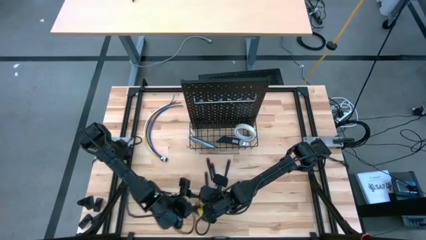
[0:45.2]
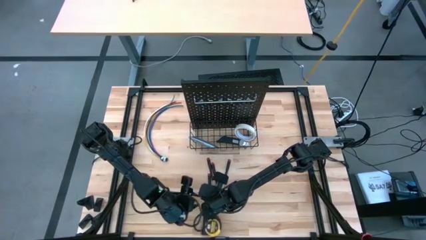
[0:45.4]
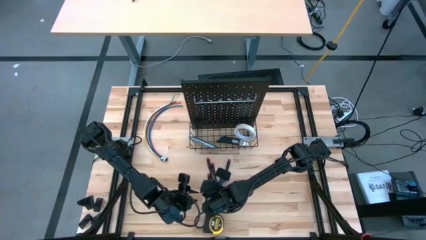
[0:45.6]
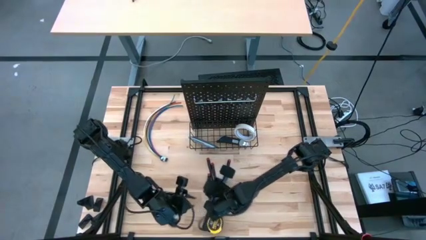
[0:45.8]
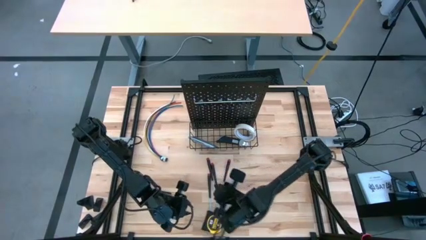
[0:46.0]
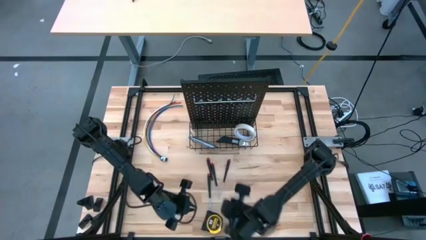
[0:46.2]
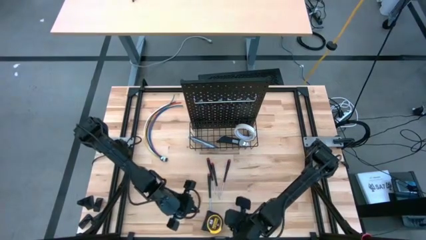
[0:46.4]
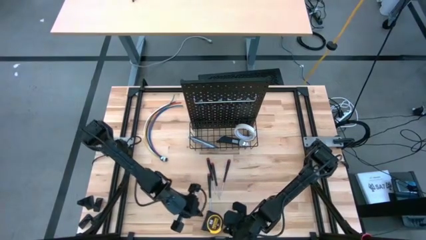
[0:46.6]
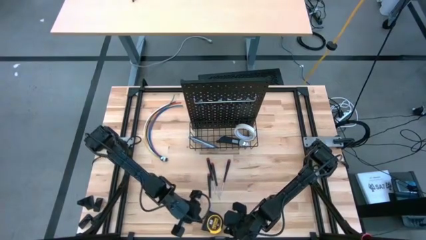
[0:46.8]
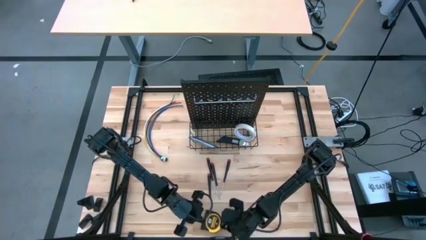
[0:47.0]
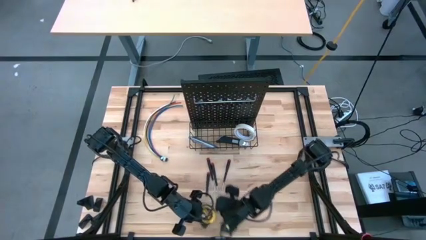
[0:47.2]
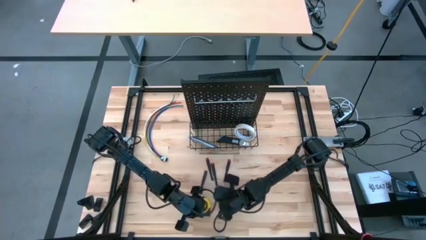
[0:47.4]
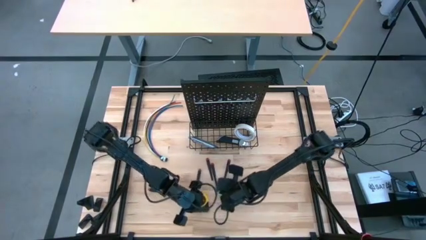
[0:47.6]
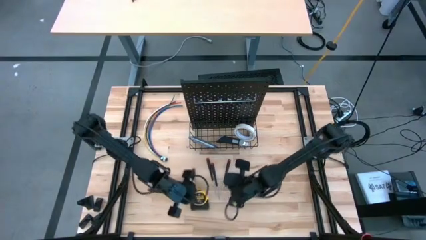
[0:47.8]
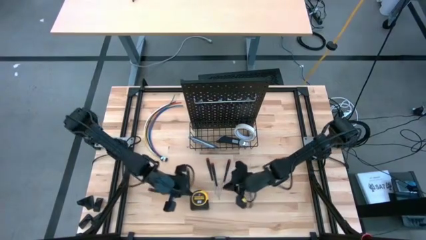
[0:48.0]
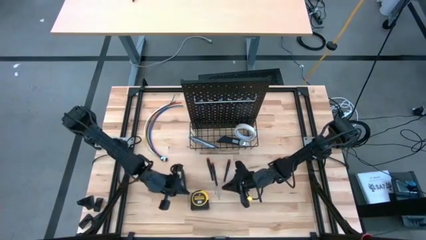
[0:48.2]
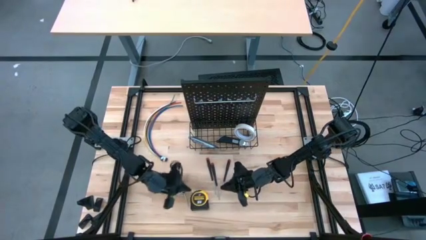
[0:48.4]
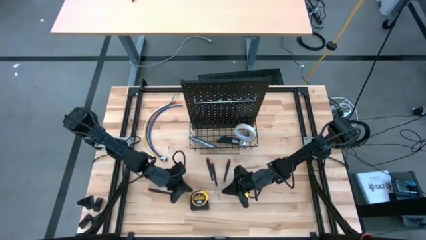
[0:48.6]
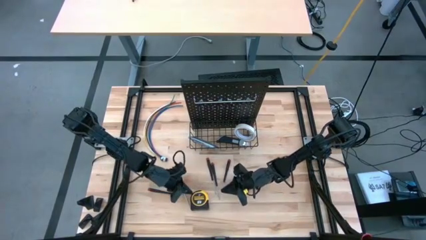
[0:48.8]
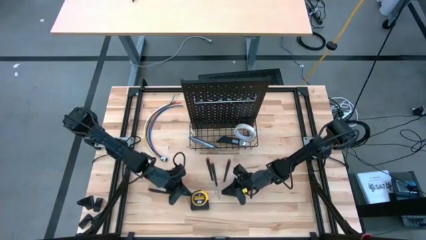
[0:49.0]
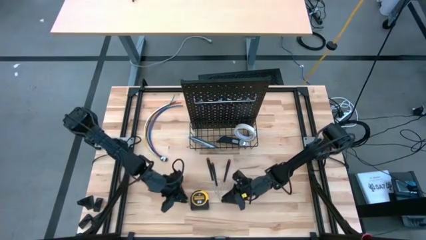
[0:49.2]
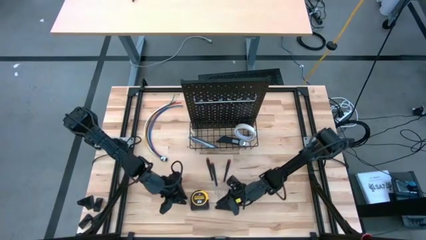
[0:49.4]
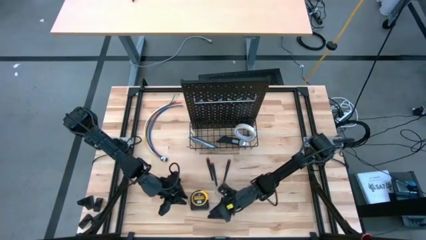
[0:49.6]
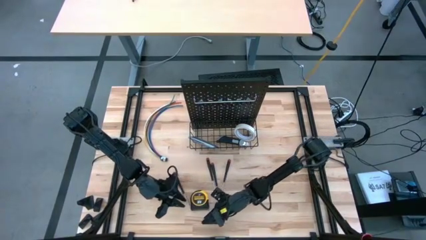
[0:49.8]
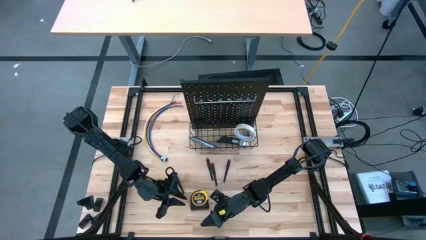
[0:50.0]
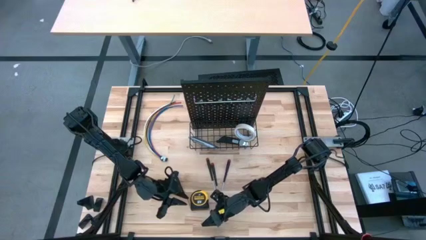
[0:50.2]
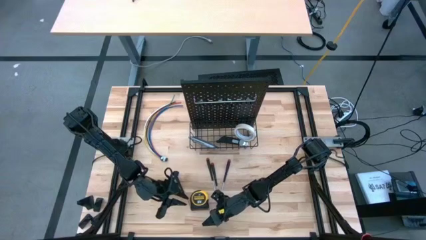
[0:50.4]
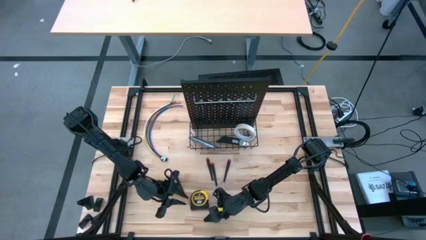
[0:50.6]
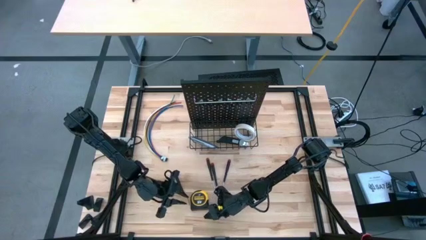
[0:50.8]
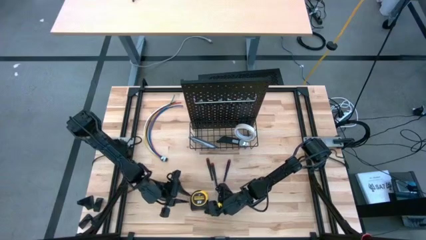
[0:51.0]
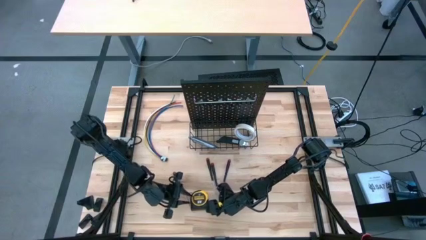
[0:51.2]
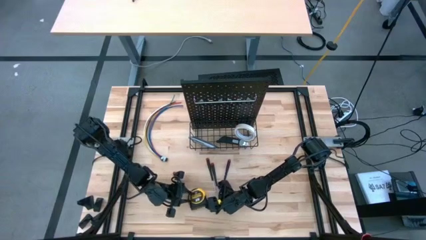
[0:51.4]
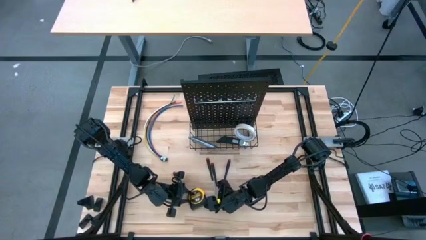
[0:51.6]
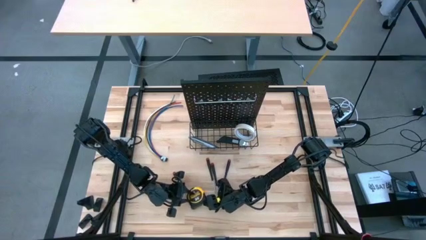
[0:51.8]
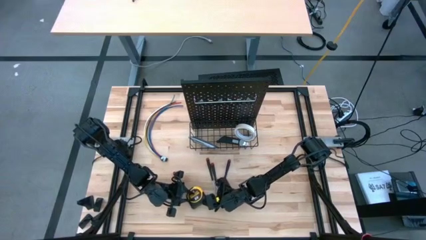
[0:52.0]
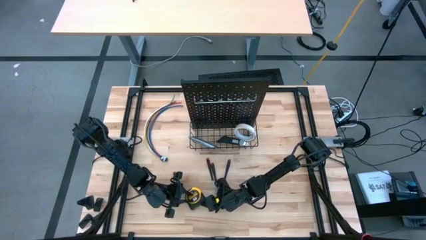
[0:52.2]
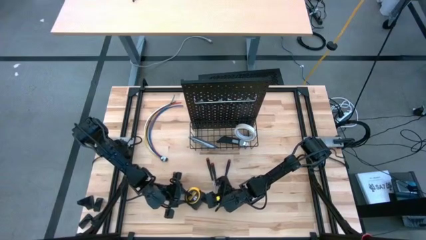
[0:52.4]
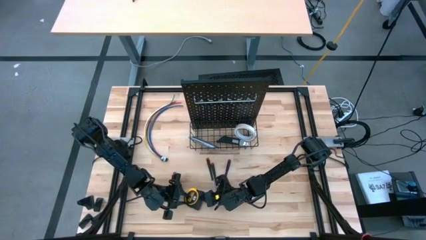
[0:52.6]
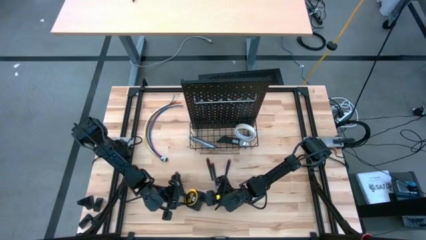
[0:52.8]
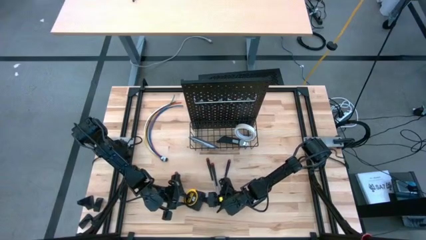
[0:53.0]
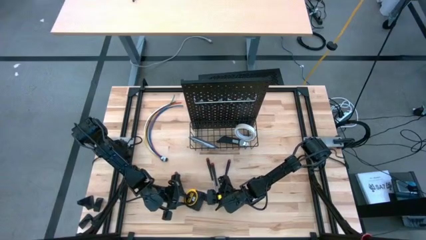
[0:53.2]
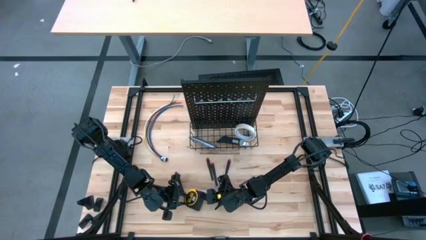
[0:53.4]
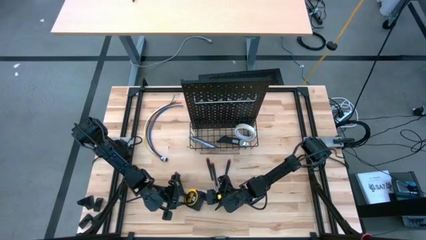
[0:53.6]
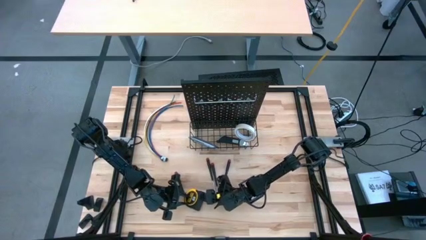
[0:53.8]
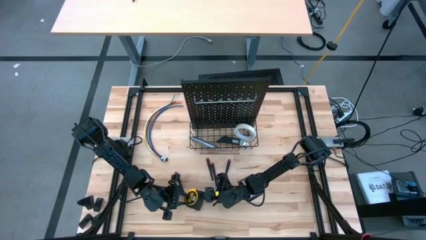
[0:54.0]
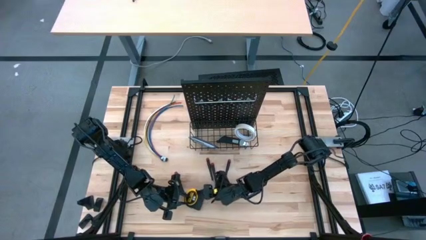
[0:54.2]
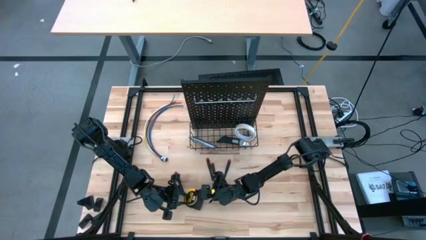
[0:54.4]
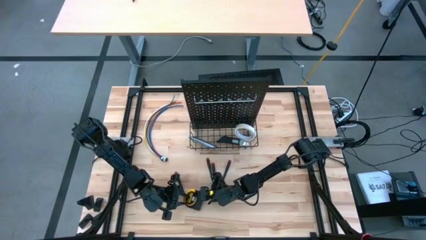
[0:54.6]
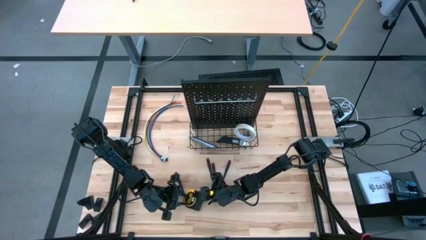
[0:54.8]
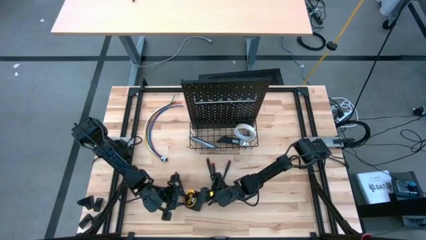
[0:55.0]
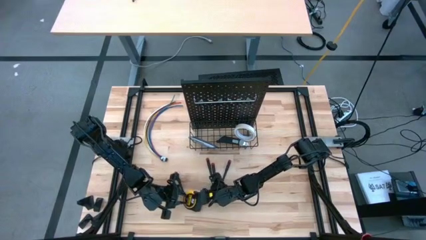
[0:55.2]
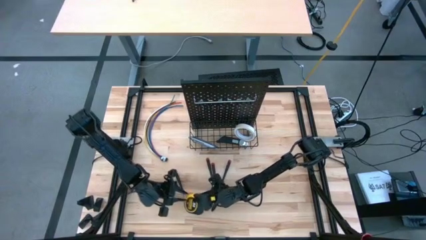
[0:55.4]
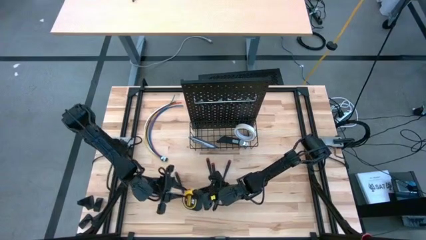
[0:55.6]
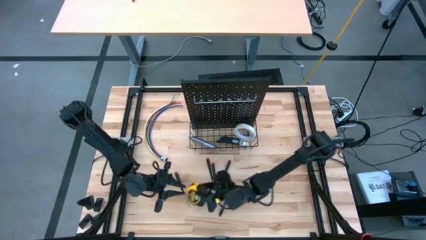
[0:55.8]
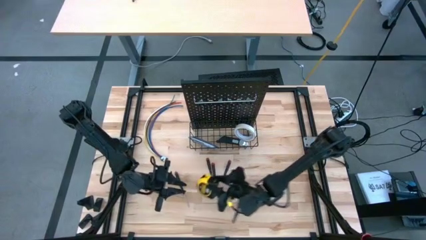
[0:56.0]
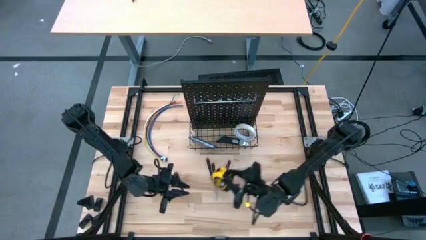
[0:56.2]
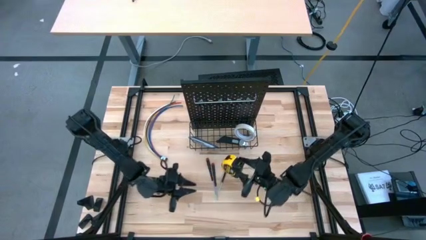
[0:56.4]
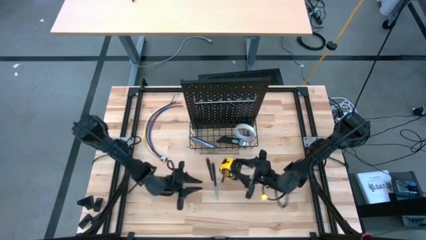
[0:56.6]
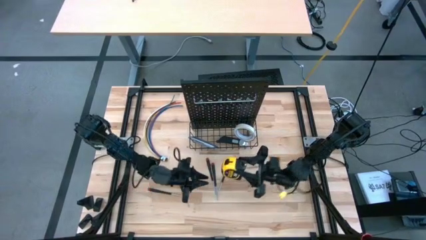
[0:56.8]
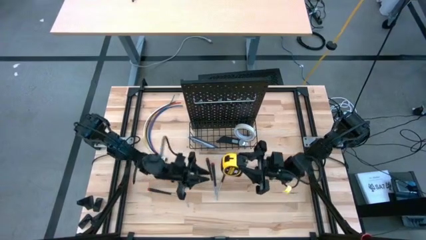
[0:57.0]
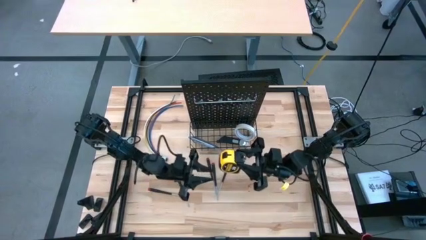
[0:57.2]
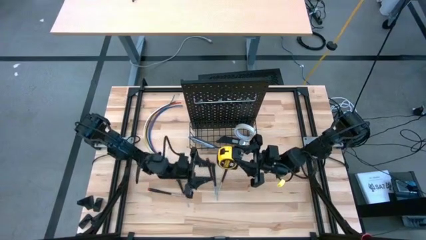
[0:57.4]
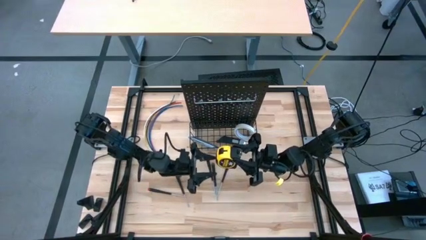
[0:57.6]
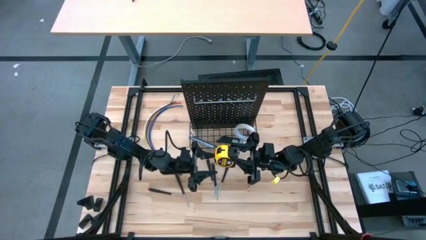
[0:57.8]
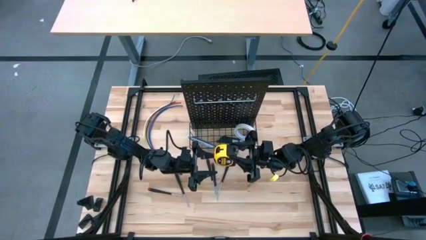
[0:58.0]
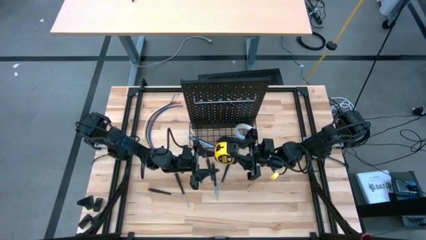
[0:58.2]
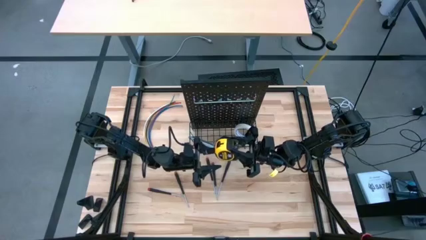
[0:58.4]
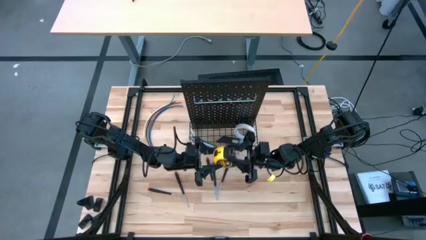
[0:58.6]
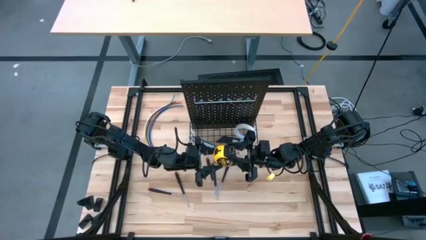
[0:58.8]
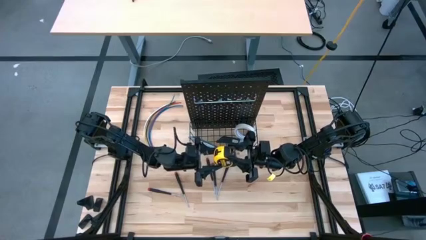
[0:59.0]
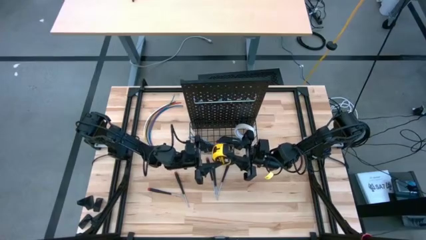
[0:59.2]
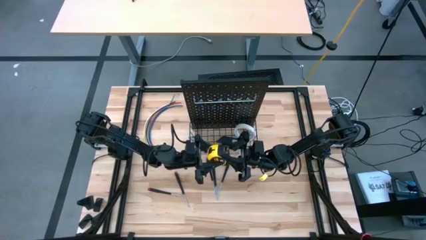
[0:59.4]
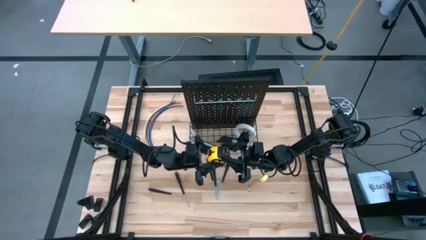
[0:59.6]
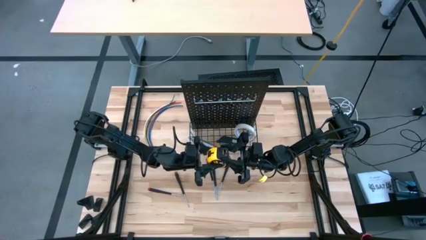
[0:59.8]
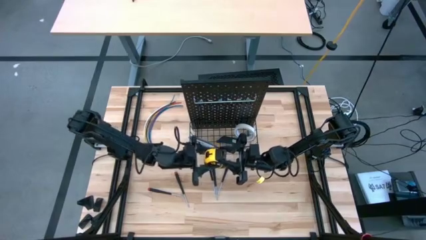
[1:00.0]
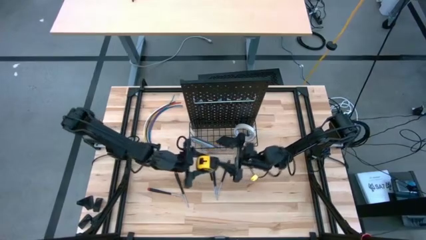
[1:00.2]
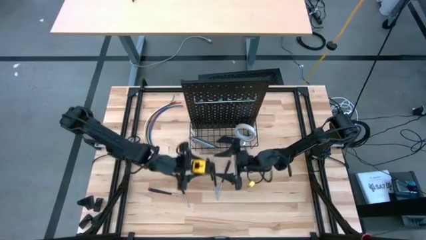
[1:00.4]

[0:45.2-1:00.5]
Task: Hang tools onto peg board
Hang the tape measure onto the wire basket on the pegboard
